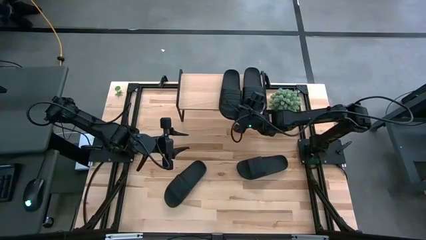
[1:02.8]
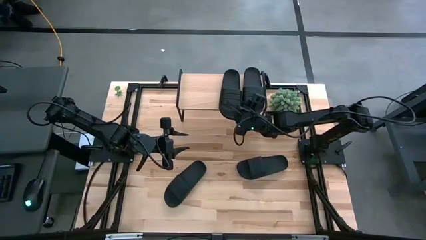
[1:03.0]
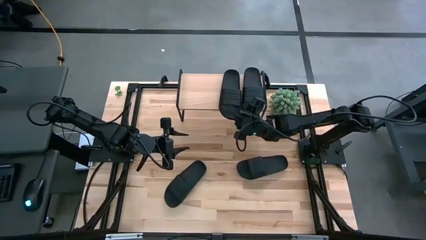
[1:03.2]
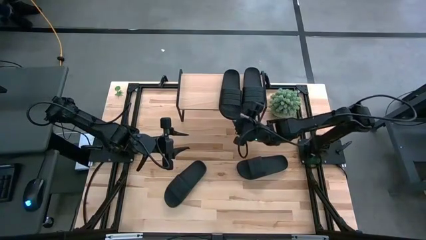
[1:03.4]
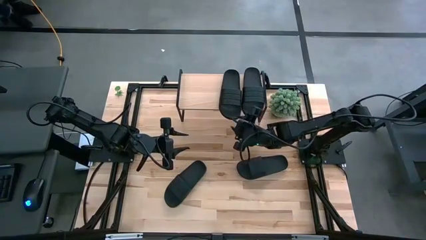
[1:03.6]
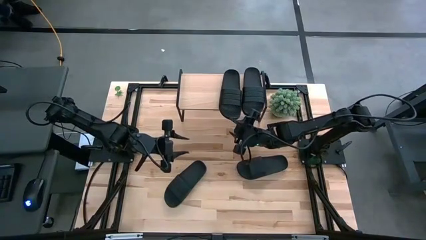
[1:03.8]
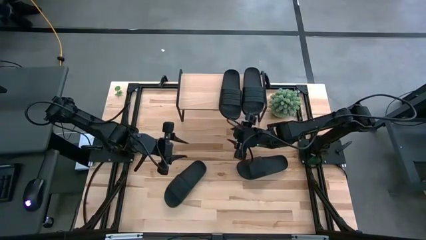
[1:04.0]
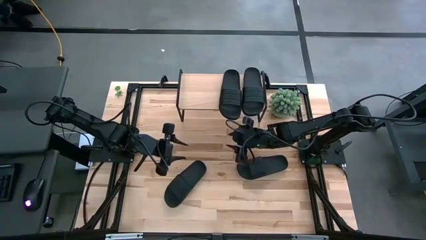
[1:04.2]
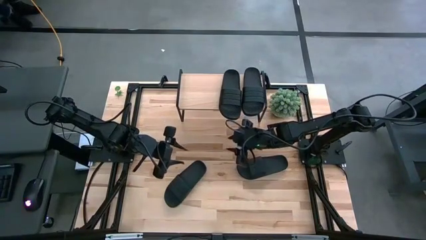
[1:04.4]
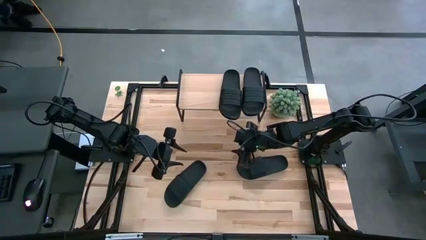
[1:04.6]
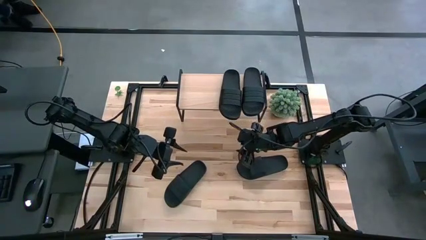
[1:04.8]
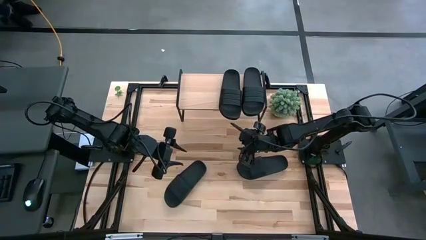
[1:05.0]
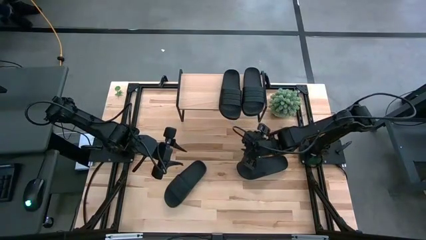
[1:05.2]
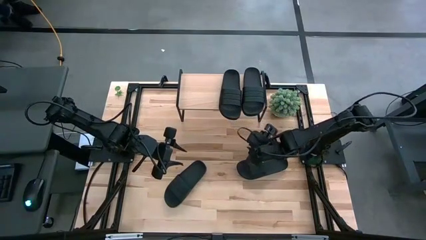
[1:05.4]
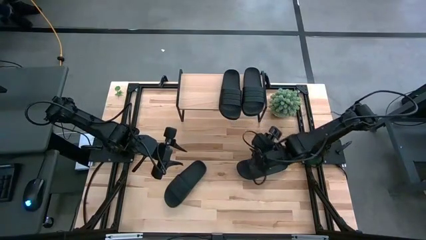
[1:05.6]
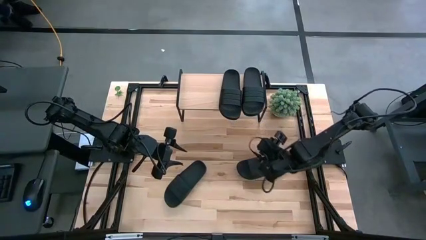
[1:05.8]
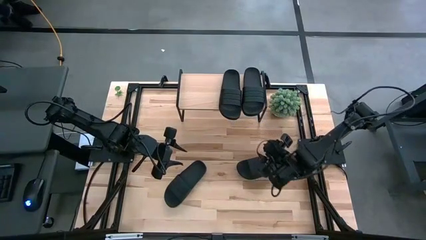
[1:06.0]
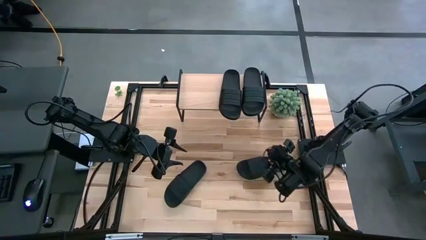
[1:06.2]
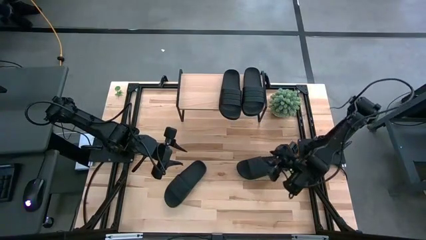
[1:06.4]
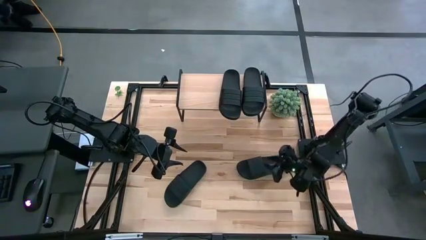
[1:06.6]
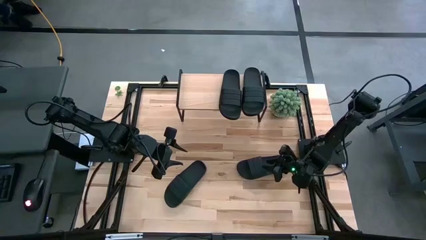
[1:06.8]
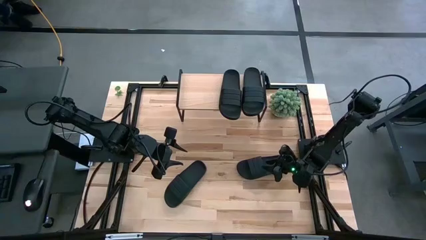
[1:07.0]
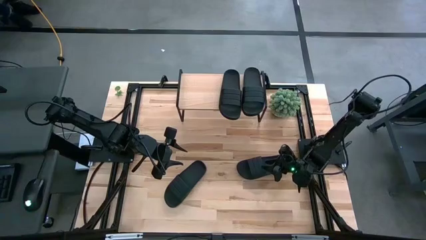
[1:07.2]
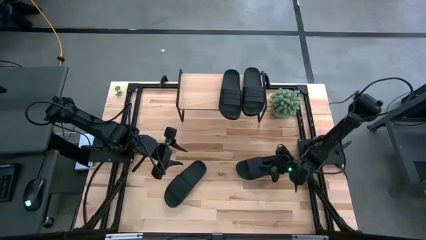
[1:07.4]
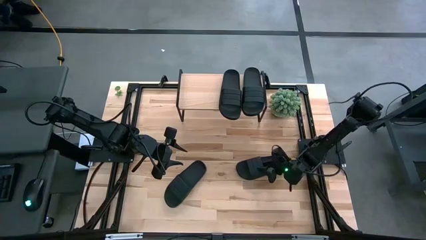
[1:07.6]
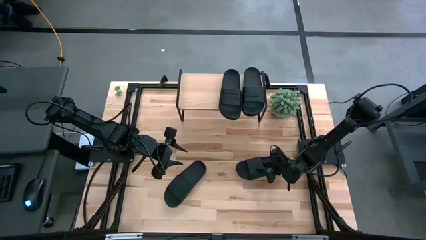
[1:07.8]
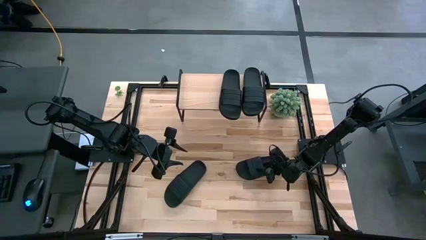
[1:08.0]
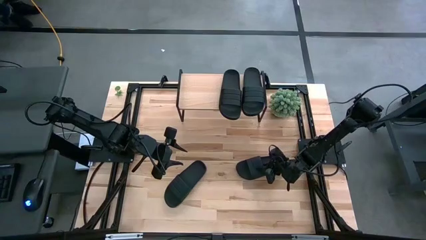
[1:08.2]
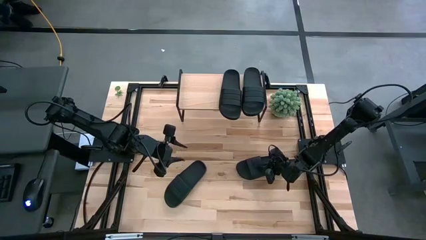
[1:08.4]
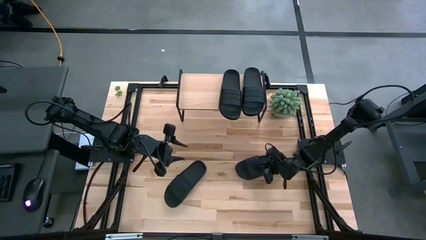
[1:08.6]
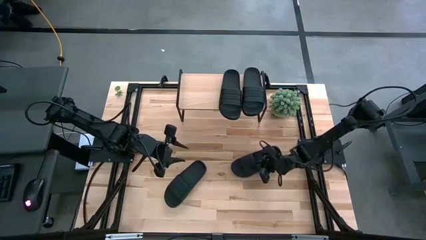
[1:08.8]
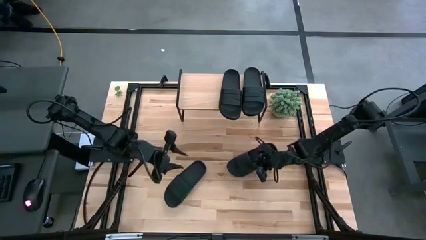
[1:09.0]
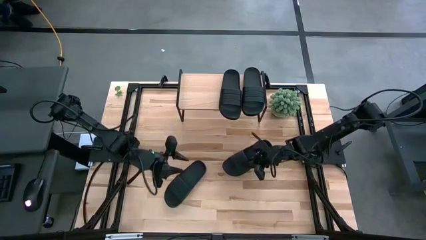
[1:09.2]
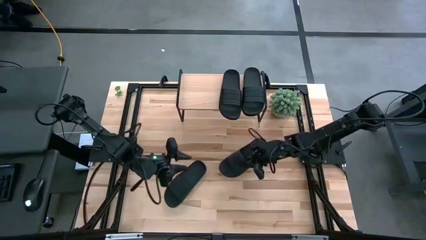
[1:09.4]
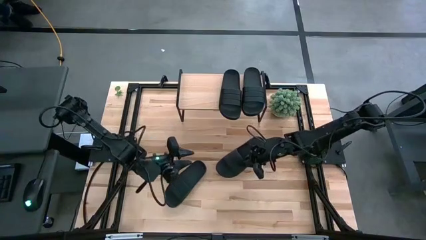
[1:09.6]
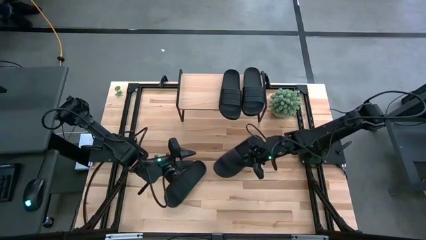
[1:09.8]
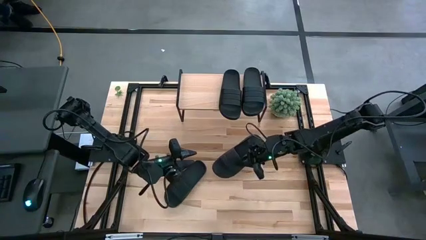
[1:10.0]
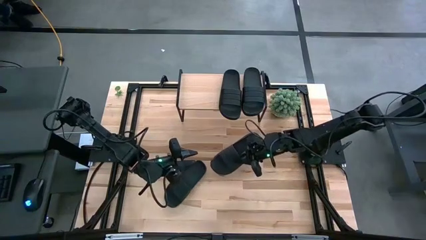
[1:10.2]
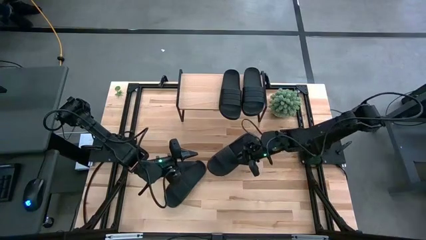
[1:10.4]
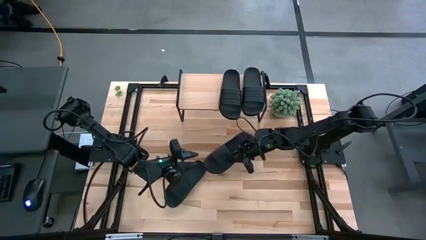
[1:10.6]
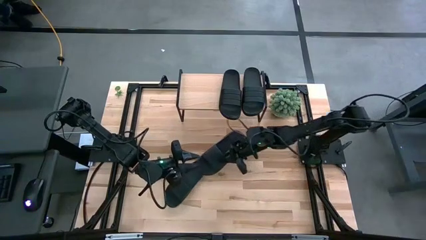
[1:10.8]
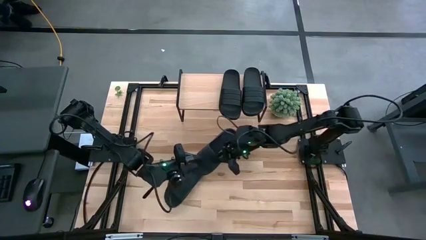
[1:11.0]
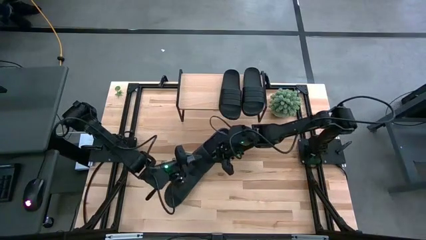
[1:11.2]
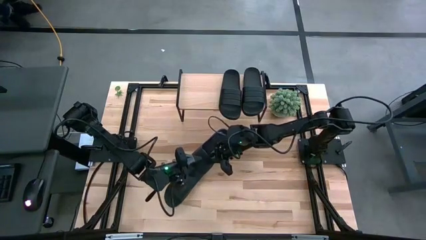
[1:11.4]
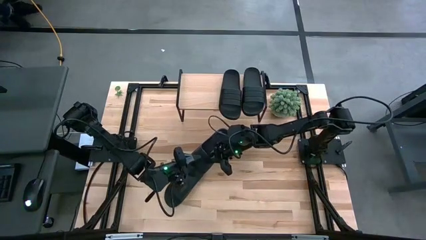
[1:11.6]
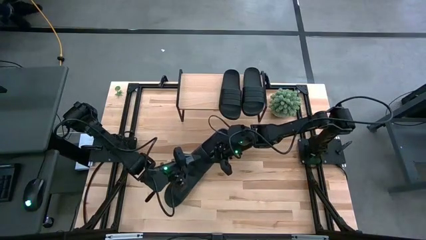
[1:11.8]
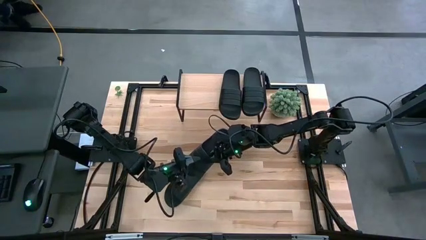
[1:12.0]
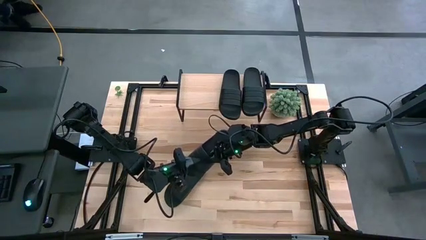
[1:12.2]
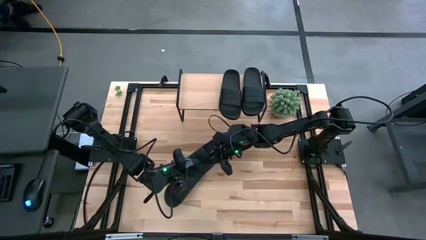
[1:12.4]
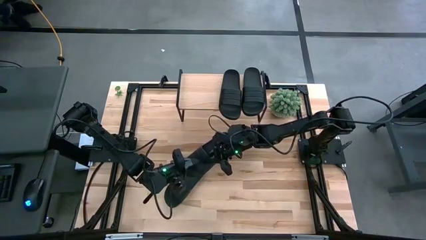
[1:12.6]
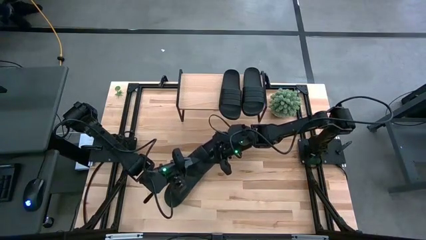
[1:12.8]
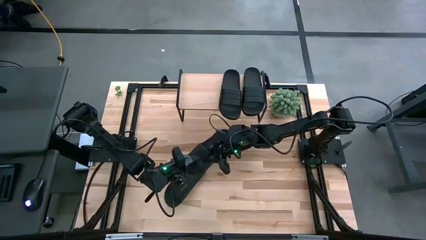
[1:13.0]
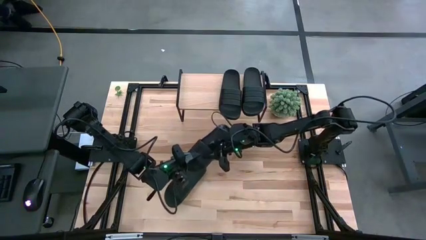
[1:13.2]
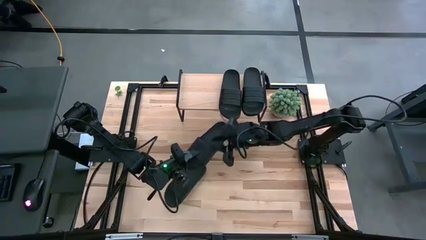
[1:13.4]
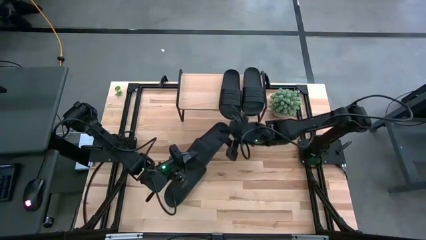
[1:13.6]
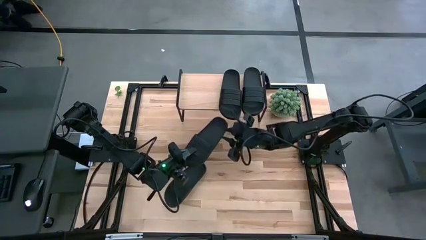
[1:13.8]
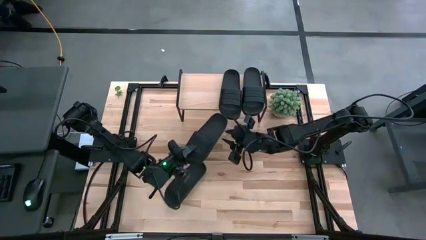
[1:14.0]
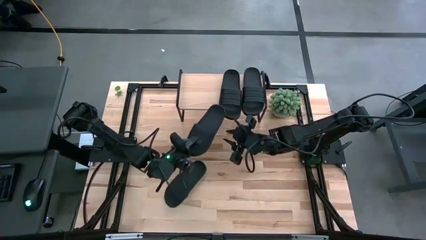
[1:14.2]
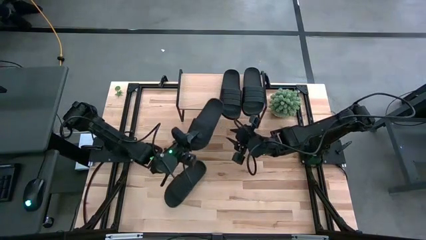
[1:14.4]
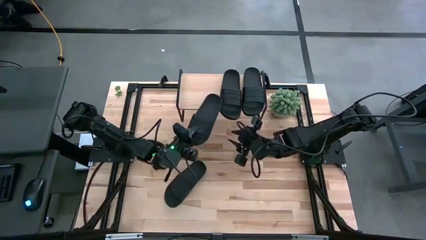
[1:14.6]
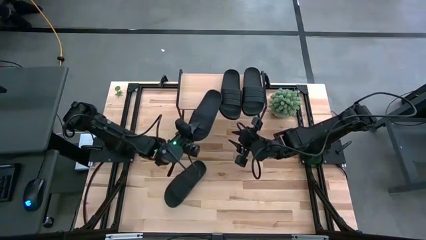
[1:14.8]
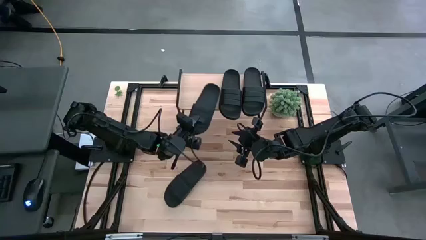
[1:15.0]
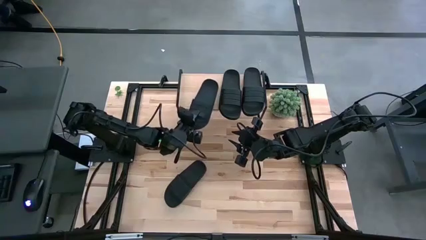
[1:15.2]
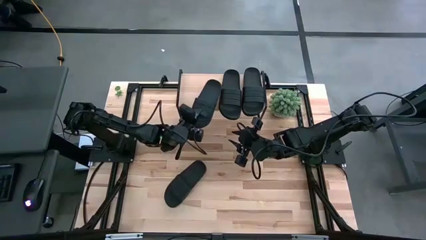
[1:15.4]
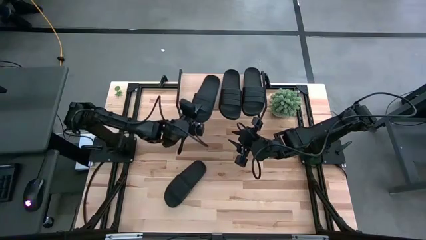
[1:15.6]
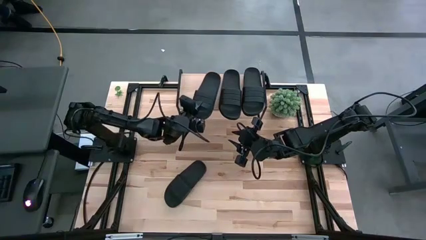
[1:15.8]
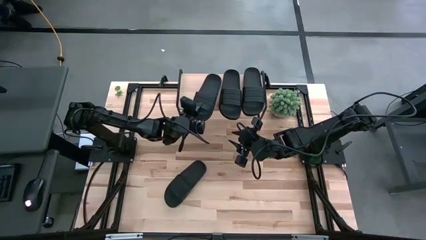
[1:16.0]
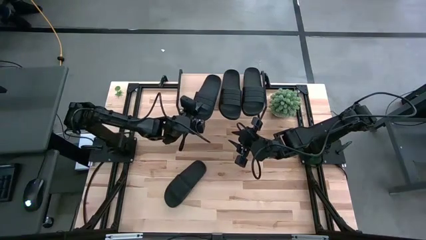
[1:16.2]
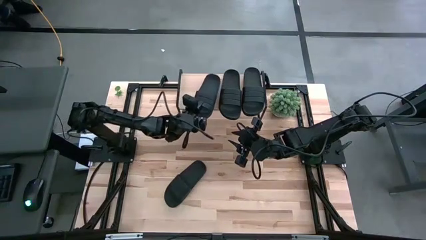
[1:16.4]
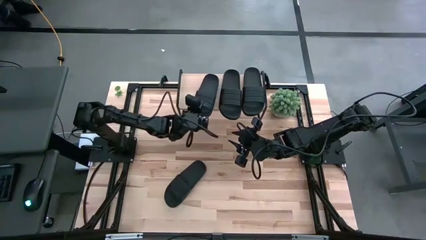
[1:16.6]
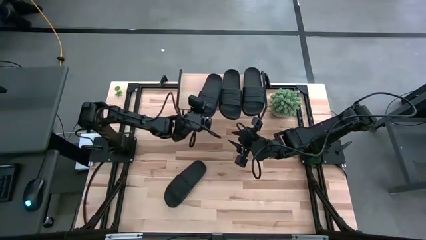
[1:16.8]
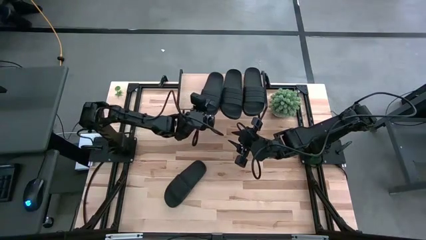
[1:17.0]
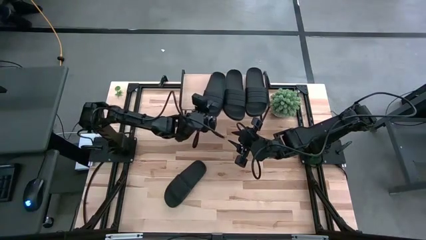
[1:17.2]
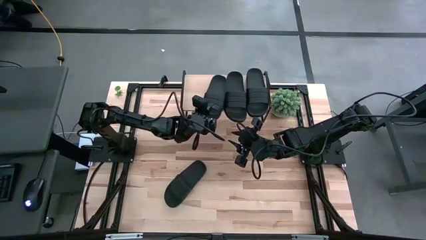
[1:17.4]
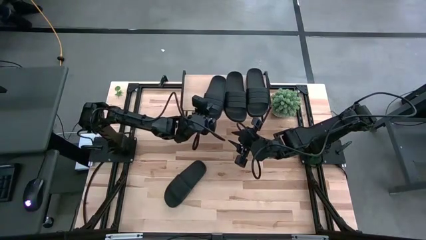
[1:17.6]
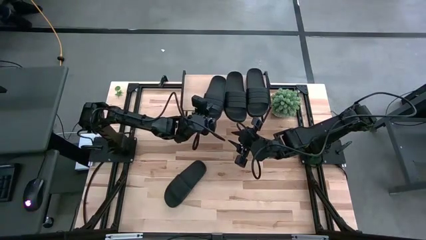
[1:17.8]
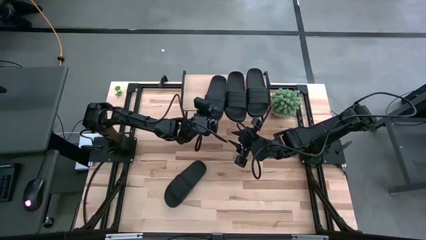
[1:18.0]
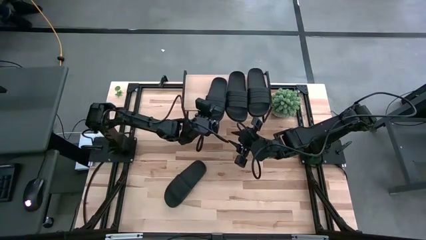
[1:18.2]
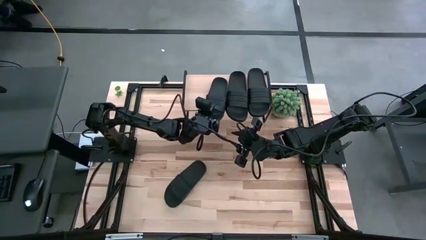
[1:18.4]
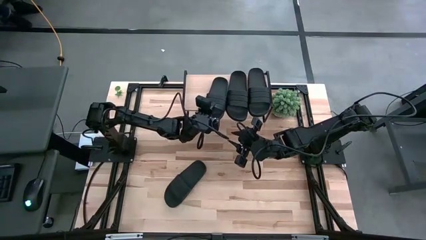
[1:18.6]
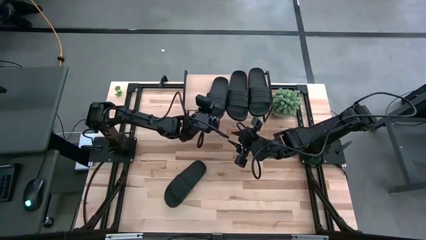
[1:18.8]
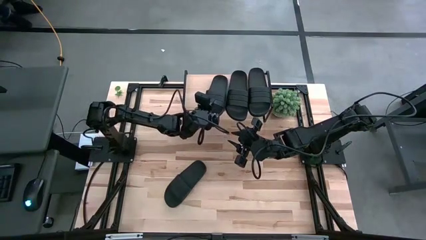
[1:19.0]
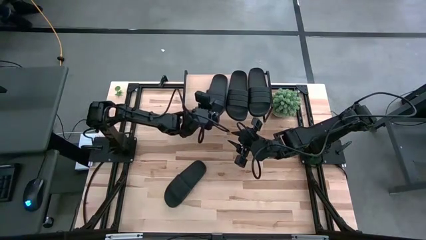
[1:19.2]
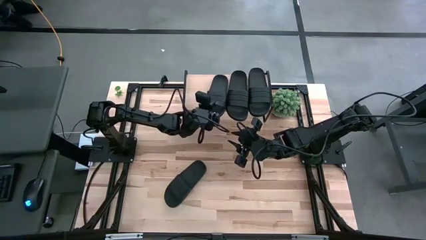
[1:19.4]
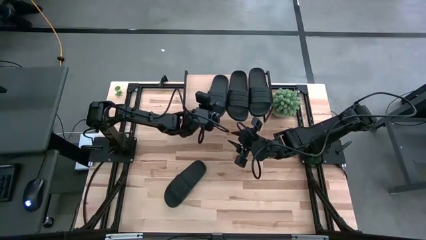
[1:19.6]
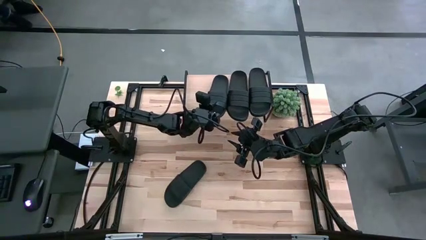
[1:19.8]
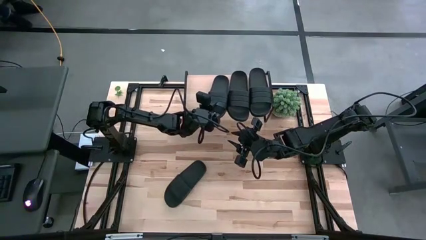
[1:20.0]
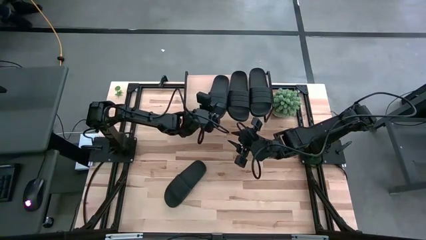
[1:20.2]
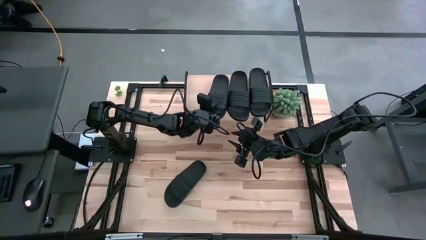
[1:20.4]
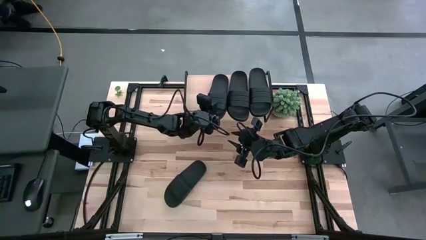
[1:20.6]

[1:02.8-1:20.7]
Task: Pick and place slides into the shelf
Put the black slipper on the shelf
